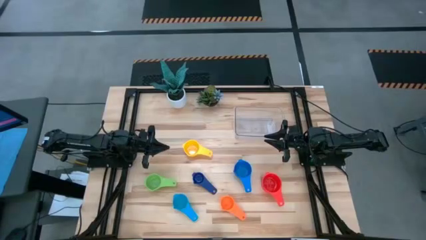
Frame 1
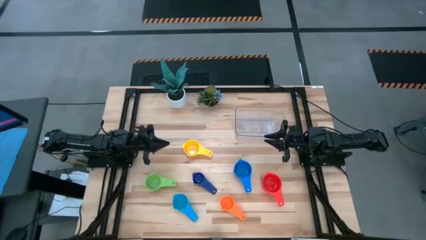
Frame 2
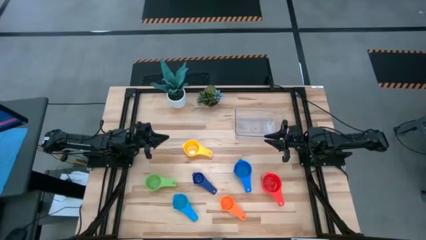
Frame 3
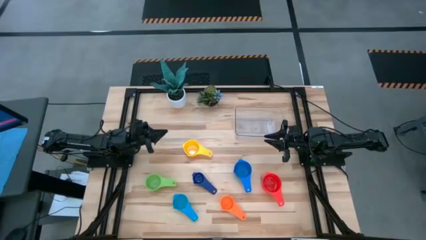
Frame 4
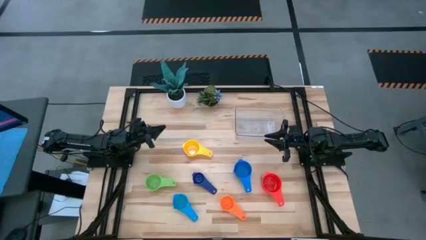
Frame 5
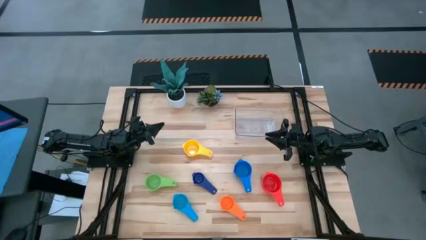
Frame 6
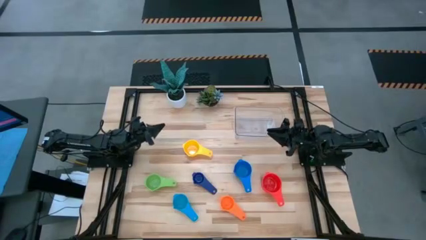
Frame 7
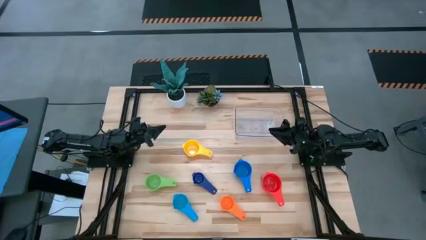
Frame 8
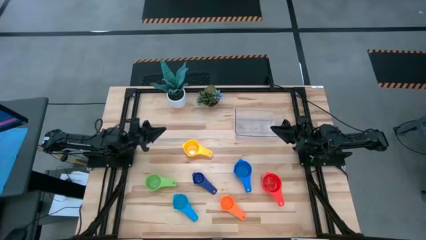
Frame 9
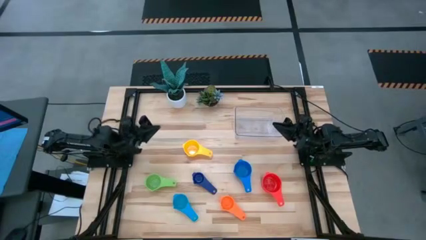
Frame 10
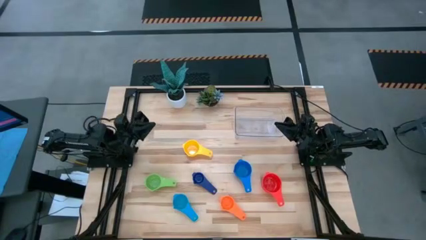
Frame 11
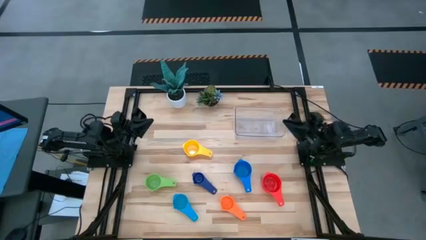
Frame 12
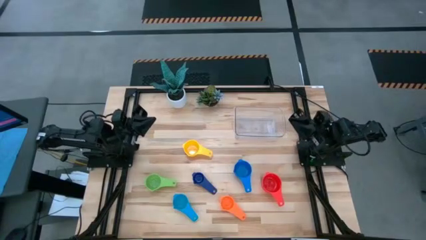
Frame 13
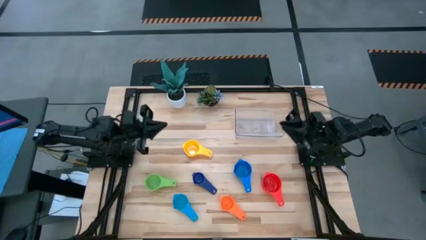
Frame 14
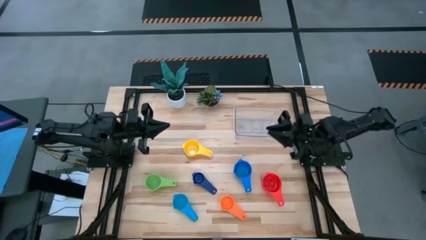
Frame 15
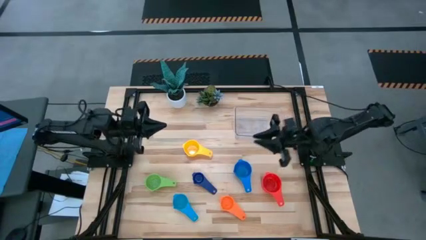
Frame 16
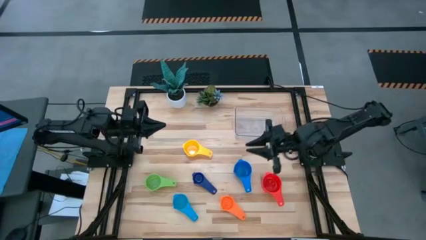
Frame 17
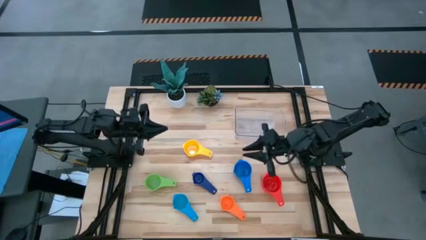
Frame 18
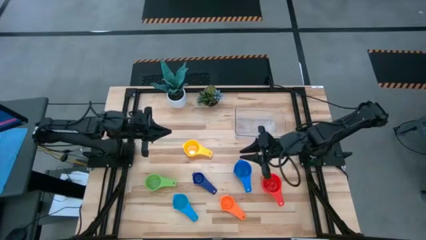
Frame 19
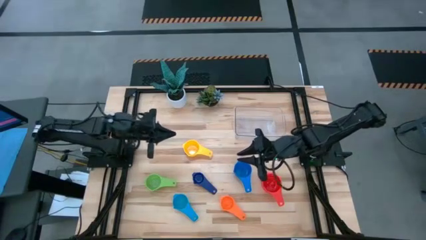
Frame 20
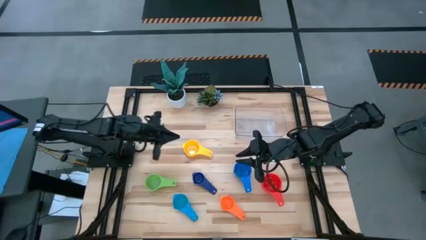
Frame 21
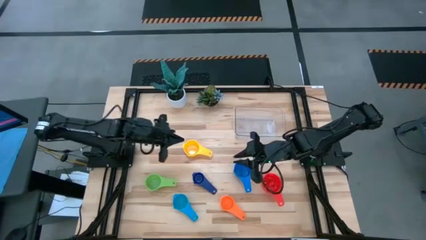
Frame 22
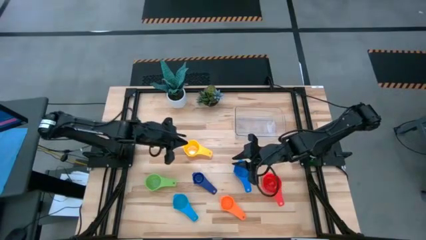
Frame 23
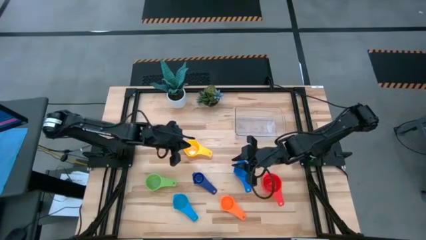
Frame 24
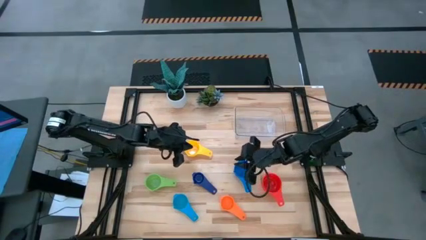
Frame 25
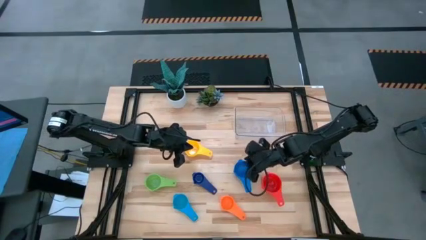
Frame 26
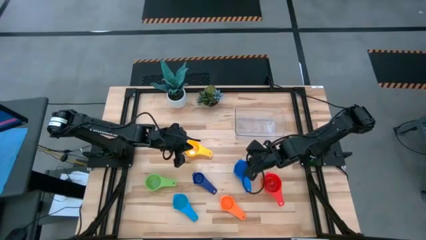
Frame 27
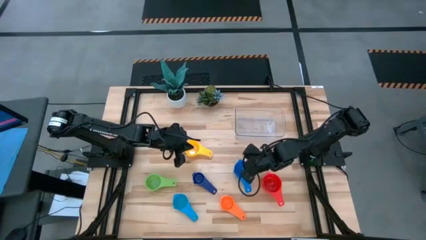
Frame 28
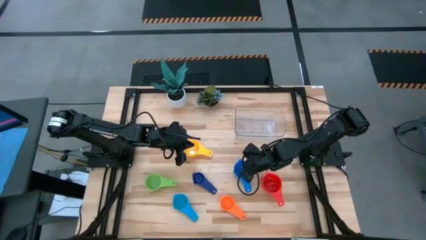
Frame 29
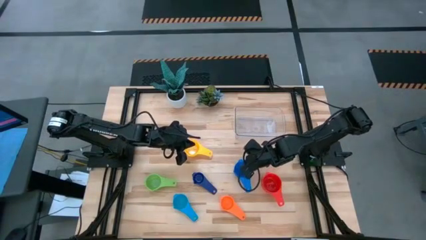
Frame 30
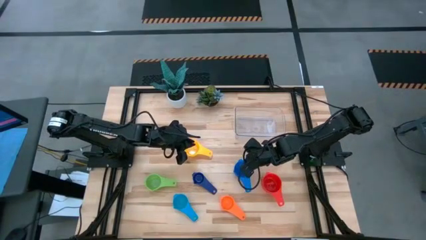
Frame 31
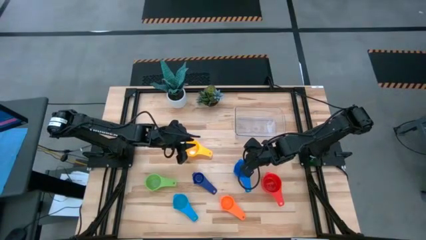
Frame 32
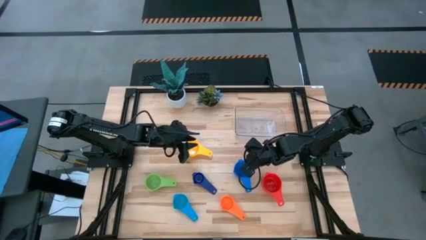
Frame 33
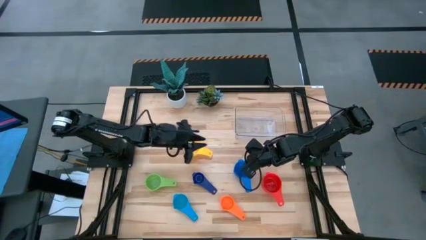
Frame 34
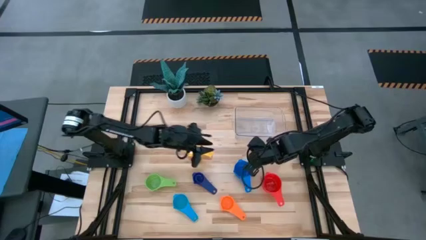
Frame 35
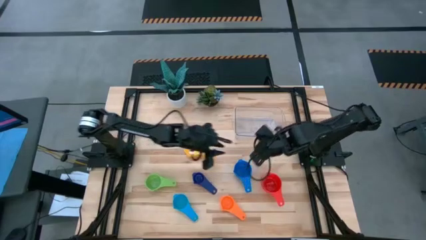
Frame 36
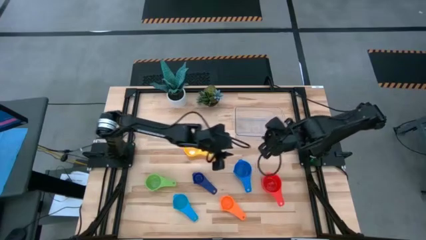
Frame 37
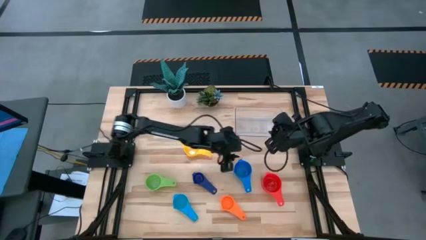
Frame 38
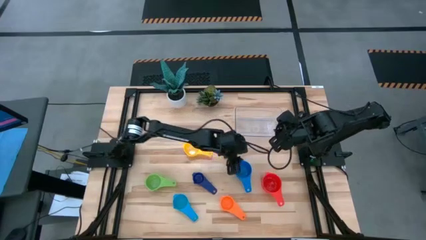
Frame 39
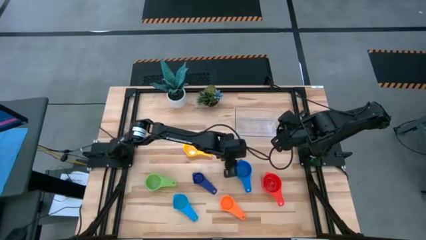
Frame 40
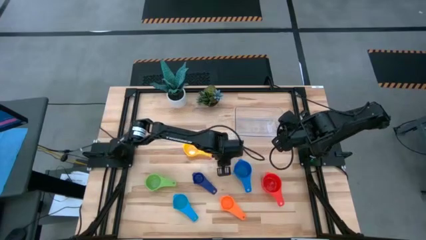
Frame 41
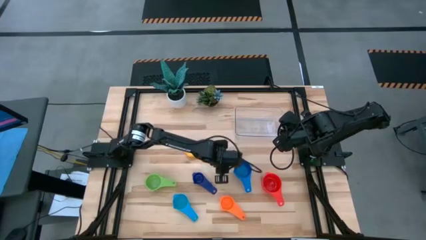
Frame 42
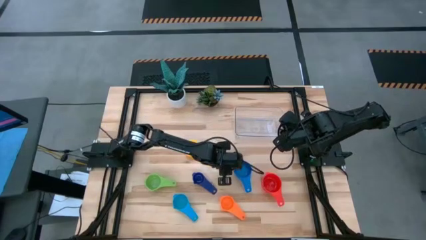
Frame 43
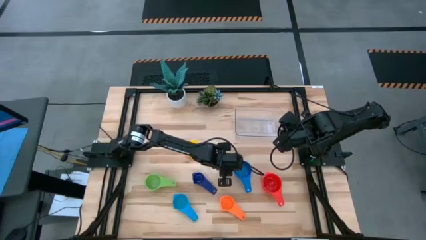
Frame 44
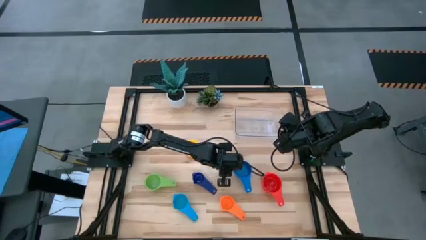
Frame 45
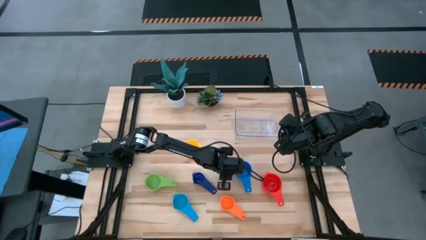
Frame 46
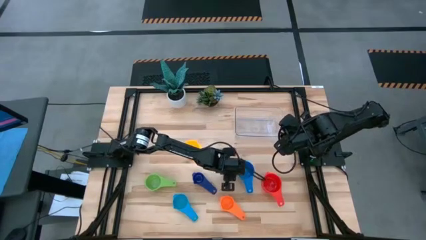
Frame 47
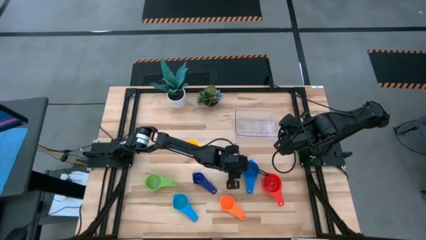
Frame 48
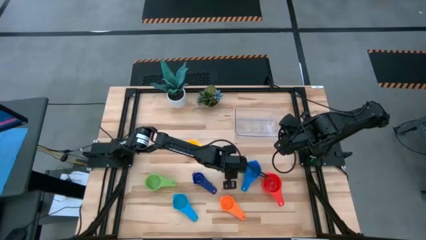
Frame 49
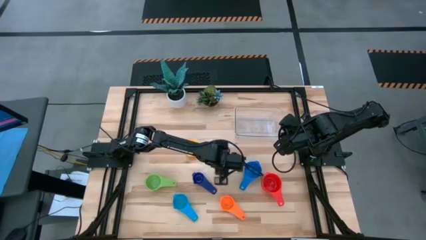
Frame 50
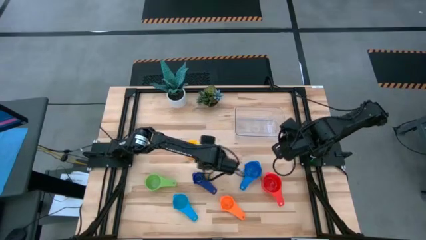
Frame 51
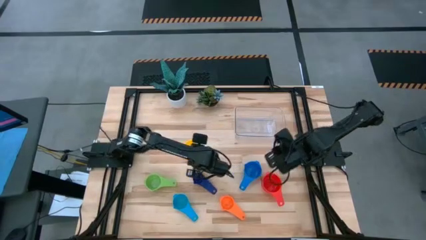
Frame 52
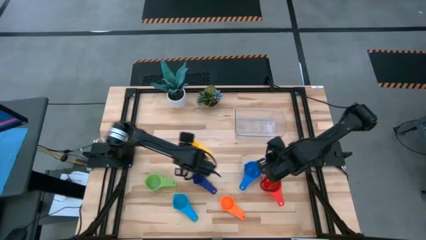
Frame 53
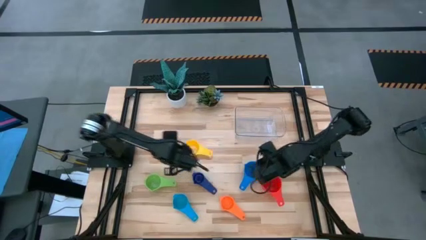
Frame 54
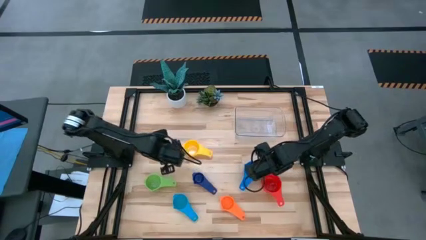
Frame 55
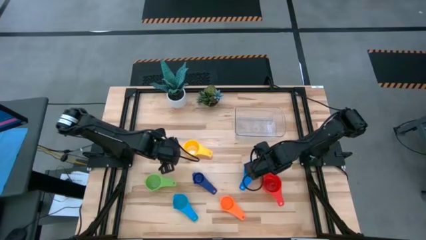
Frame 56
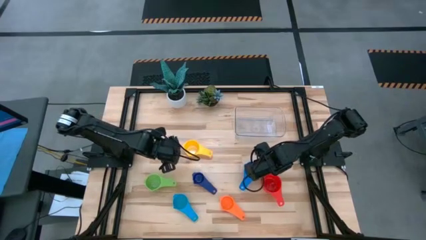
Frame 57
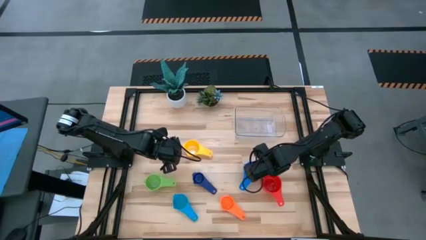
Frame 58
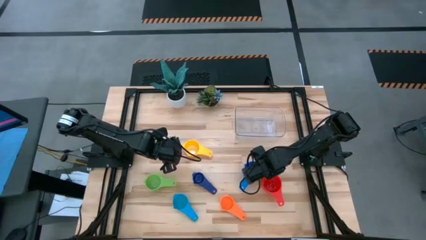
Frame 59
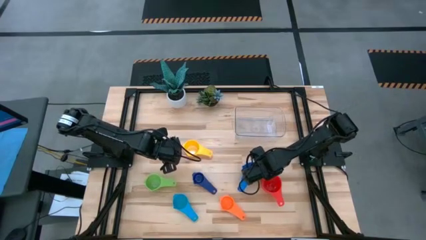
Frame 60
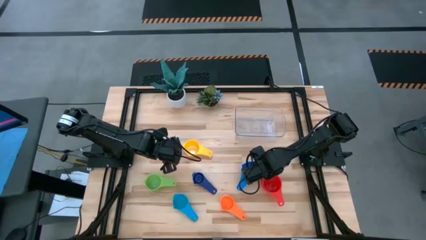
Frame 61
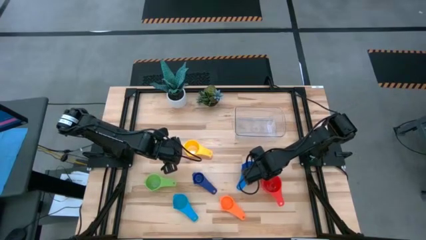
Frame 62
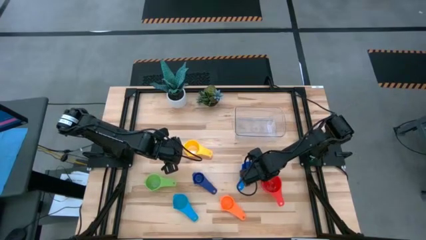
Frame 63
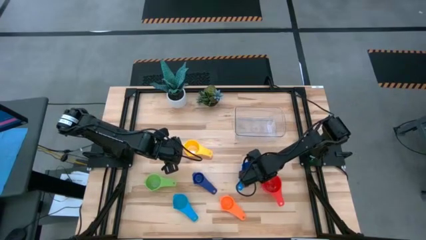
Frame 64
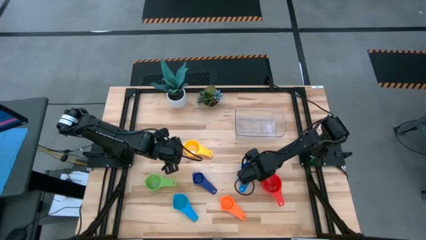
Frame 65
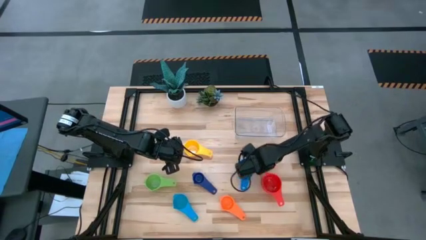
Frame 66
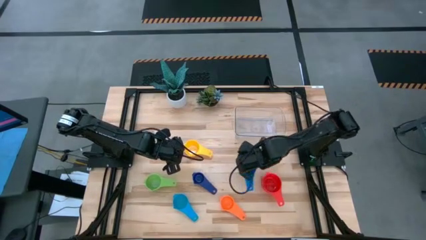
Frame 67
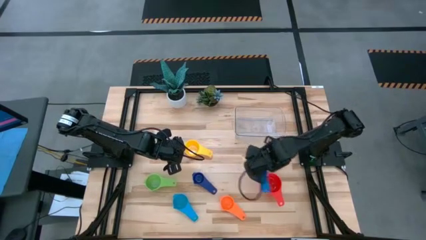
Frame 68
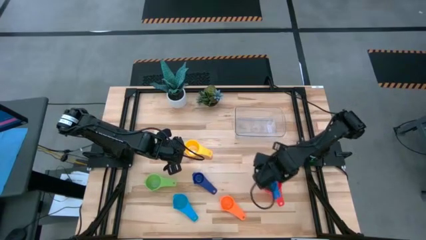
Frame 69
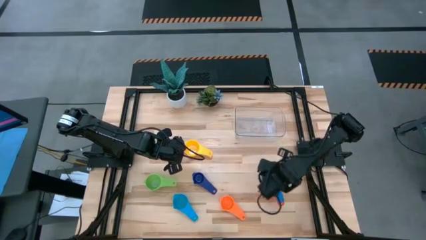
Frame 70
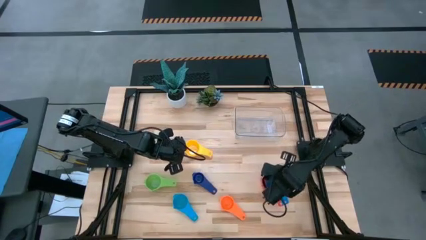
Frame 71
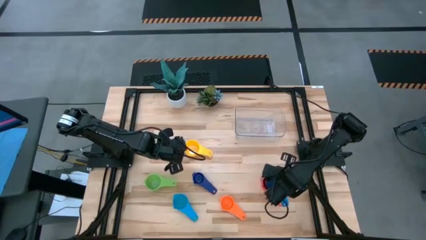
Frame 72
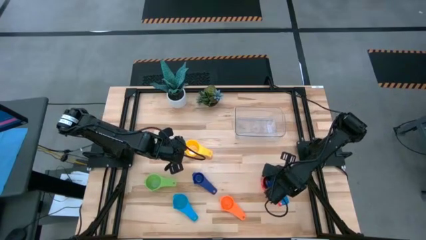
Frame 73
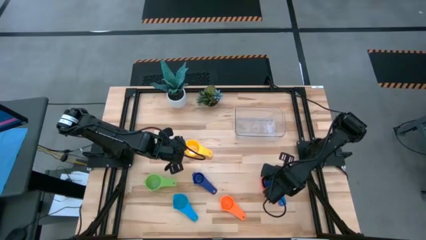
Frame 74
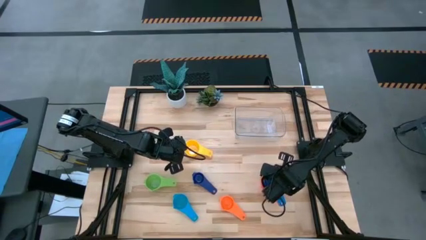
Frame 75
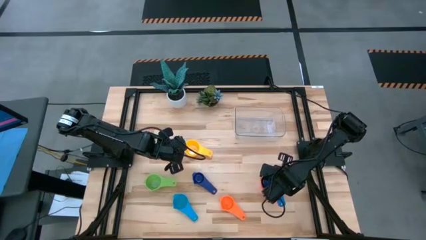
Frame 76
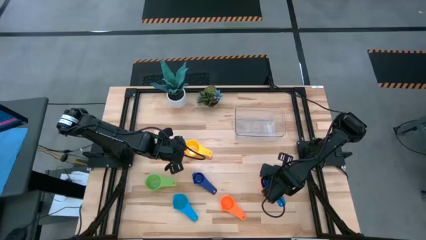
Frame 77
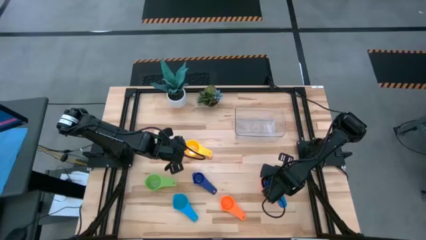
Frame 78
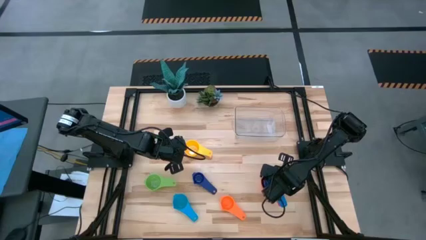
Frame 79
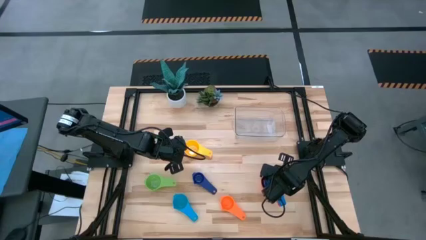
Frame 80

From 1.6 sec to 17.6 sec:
Task: Nest measuring cups in basket
Stack the blue measuring cup on top of the red measuring cup
